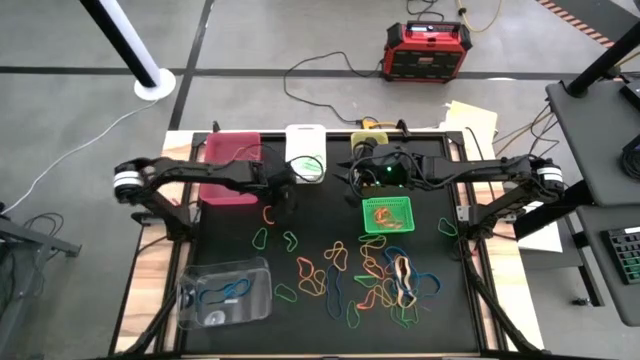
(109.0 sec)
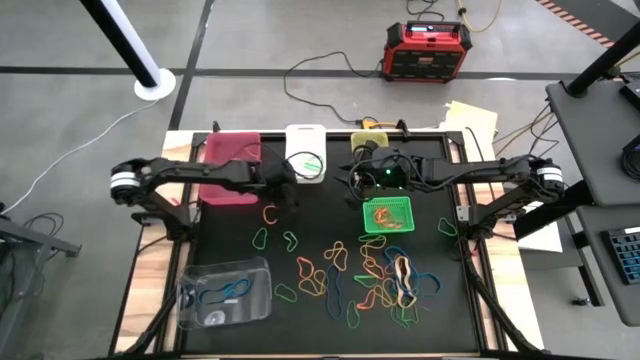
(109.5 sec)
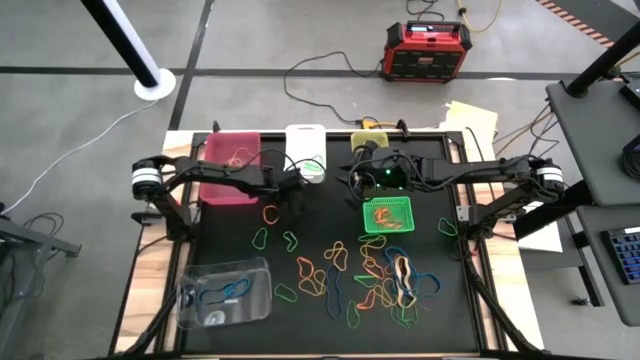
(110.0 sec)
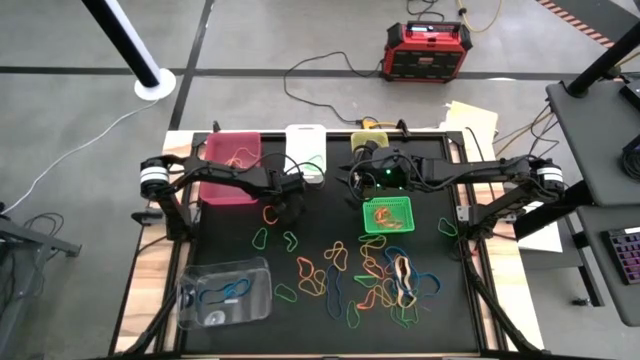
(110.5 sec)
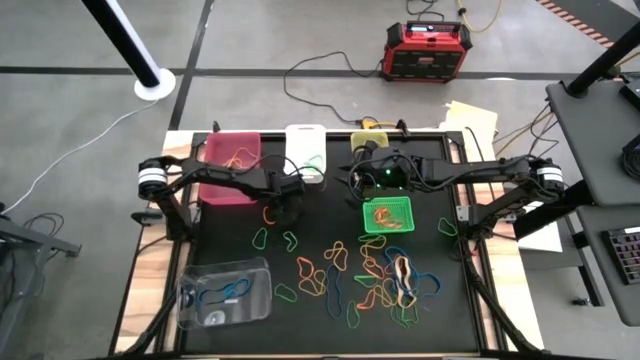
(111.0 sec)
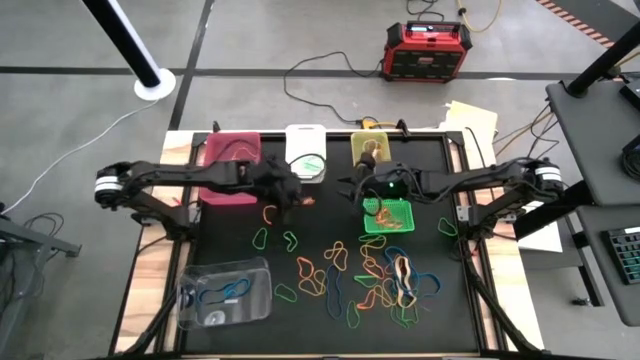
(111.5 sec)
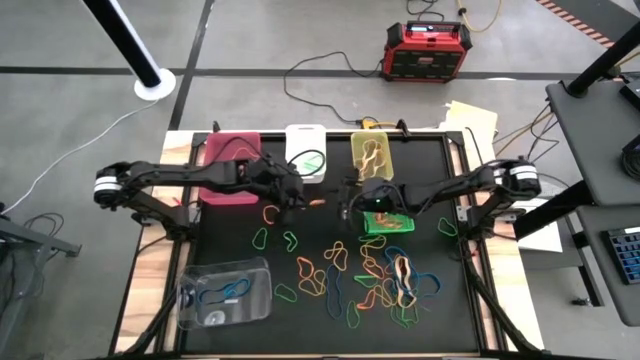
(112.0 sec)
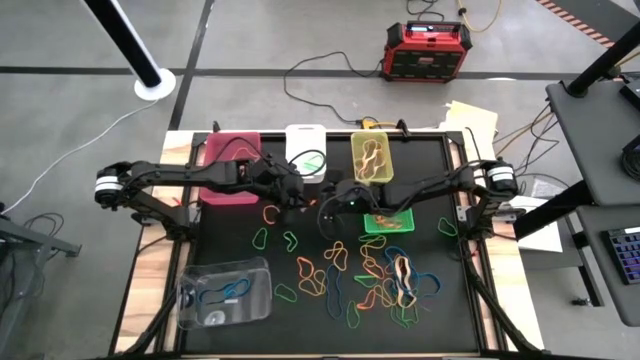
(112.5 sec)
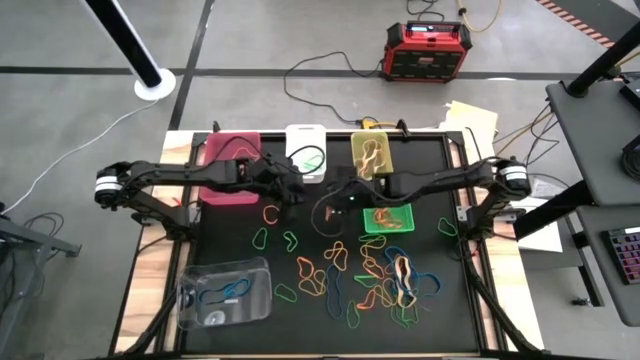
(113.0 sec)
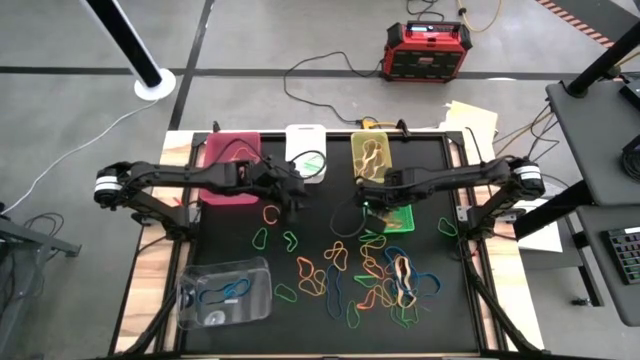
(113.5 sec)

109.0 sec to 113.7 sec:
Task: Sort rubber bands into baskets
Put the orange rubber band into the green bin

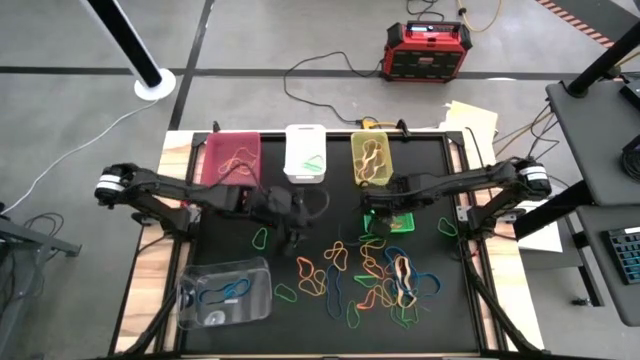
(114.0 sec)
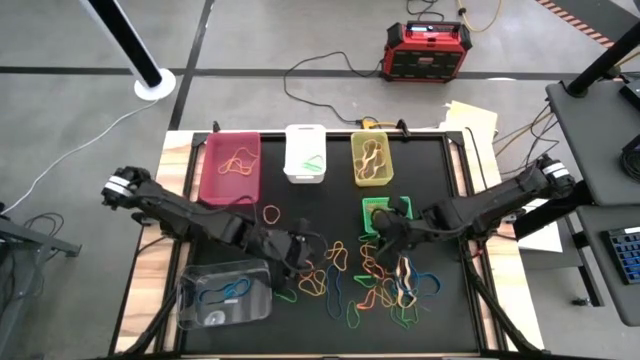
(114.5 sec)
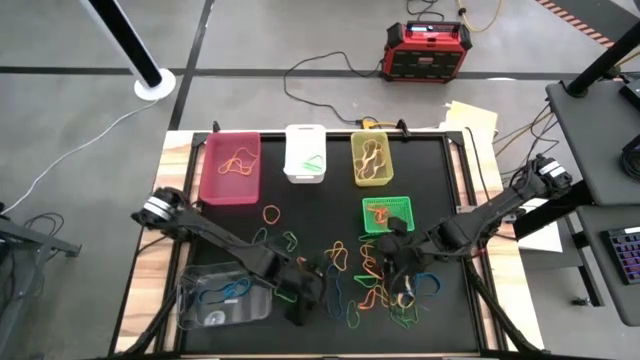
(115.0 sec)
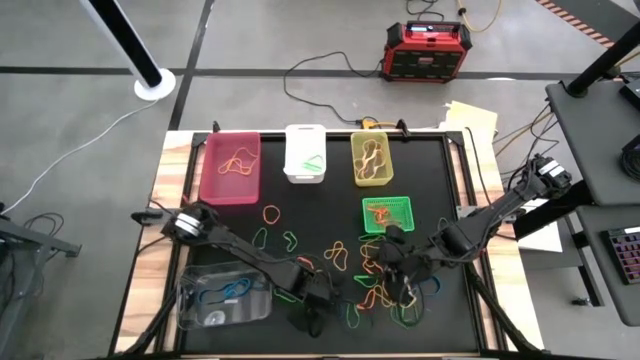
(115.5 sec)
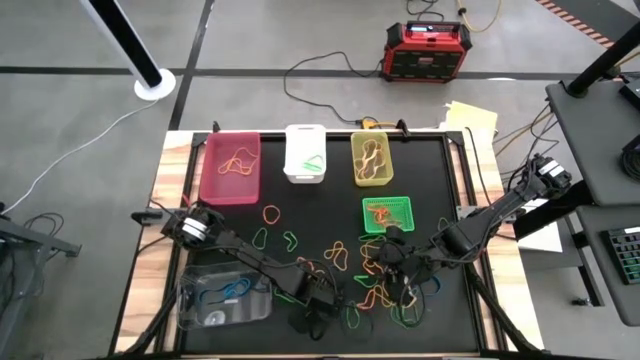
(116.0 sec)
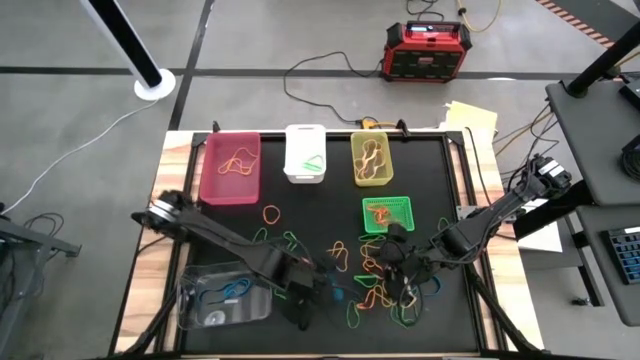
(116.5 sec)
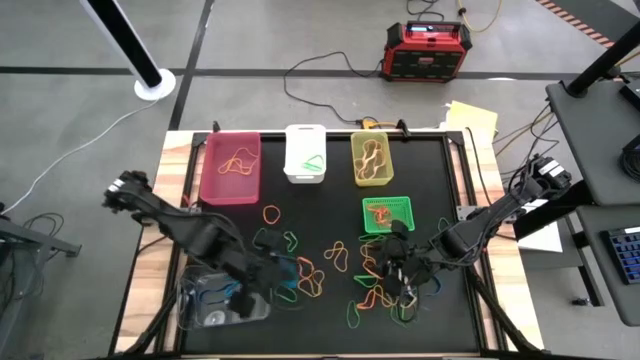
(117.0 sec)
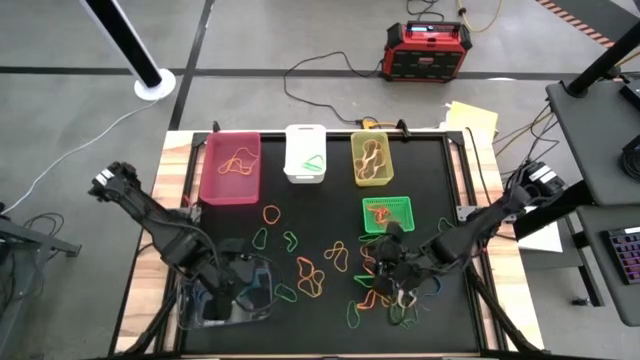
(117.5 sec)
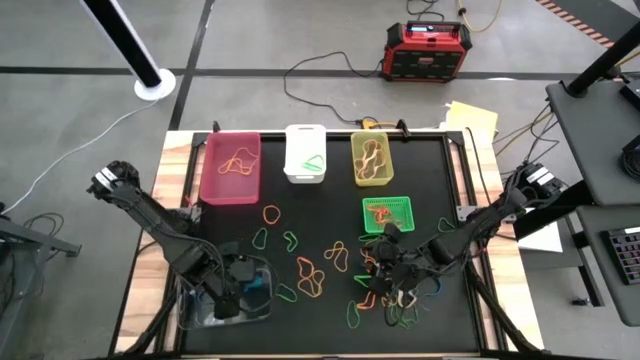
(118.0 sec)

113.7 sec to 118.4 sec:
Put the blue rubber band into the transparent bin

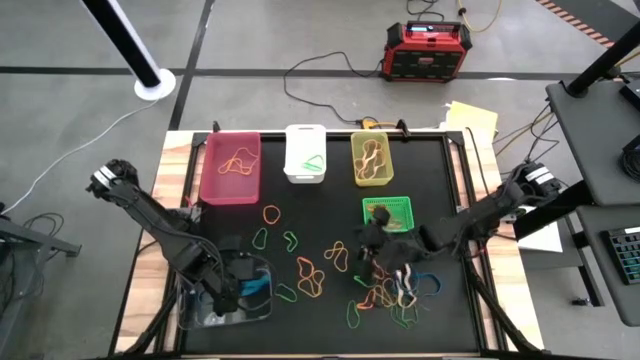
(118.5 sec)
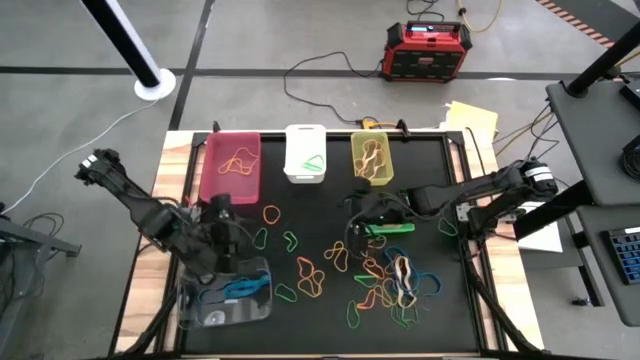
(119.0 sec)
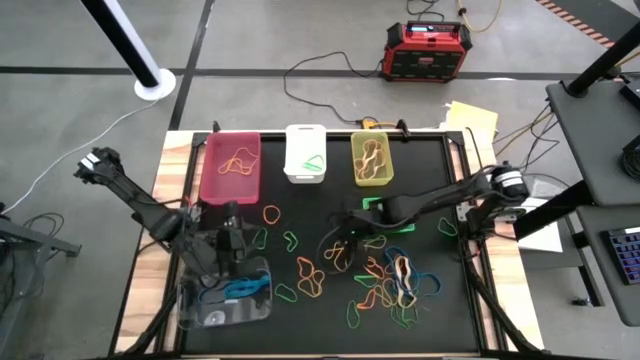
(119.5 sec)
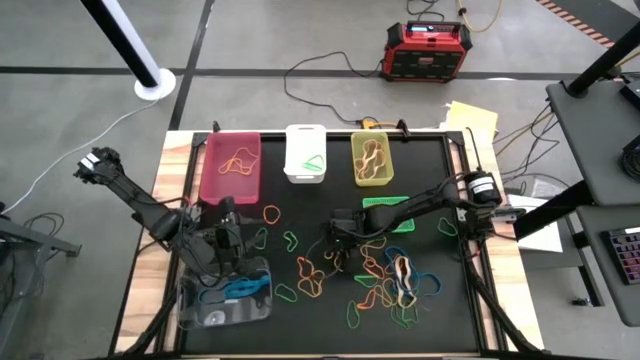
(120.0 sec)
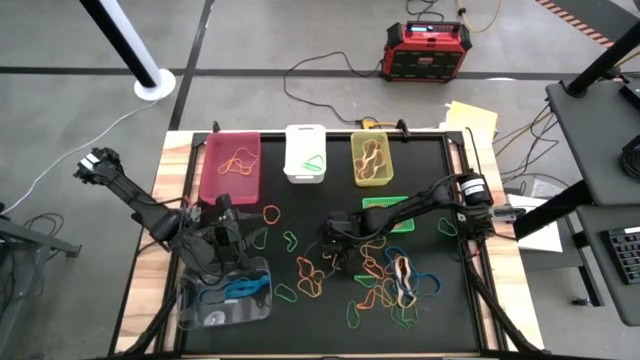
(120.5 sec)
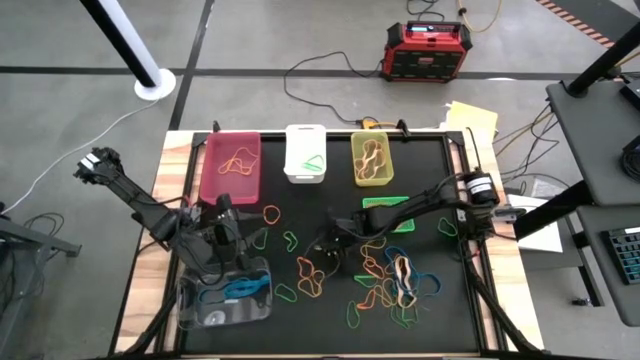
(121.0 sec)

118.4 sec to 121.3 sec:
Put the yellow rubber band into the pink bin

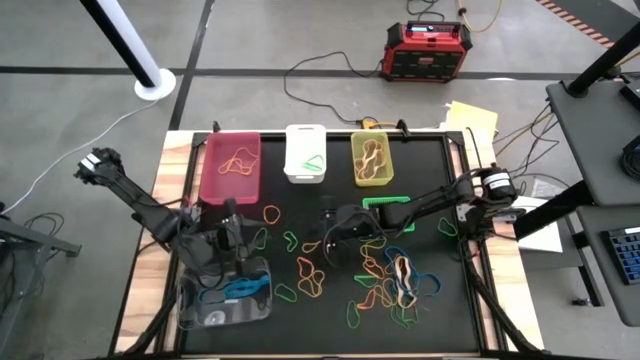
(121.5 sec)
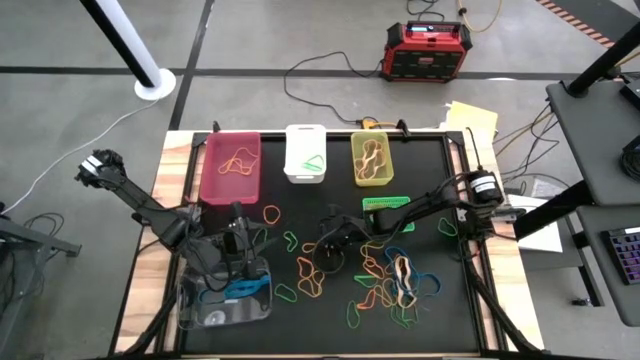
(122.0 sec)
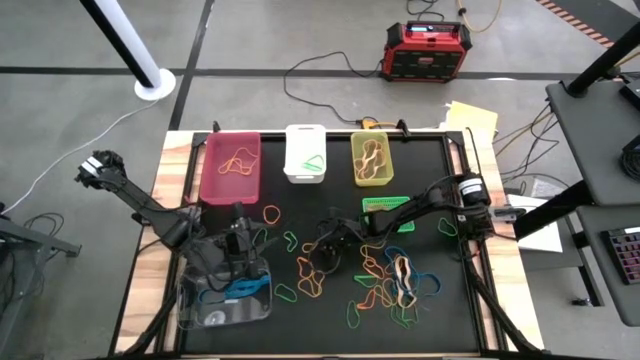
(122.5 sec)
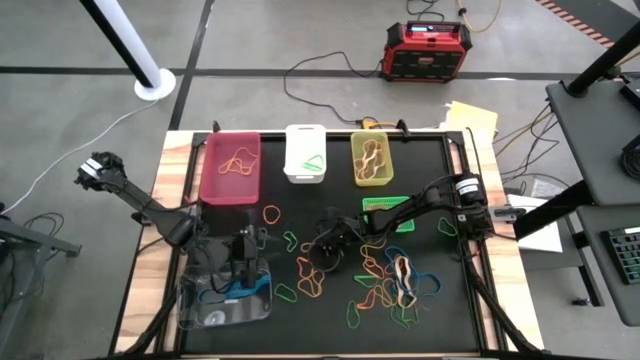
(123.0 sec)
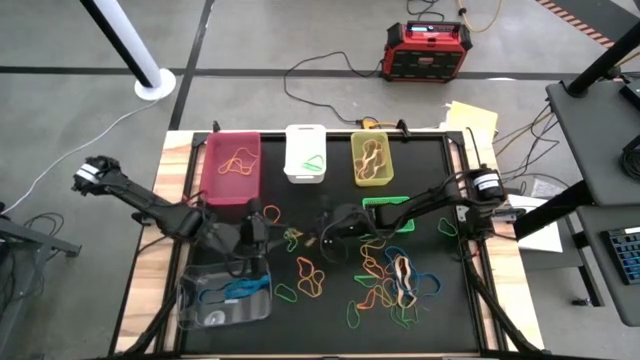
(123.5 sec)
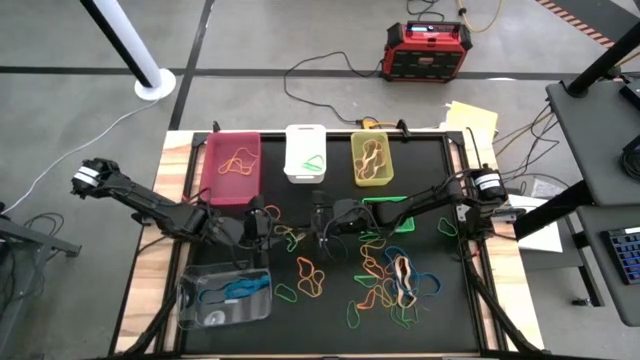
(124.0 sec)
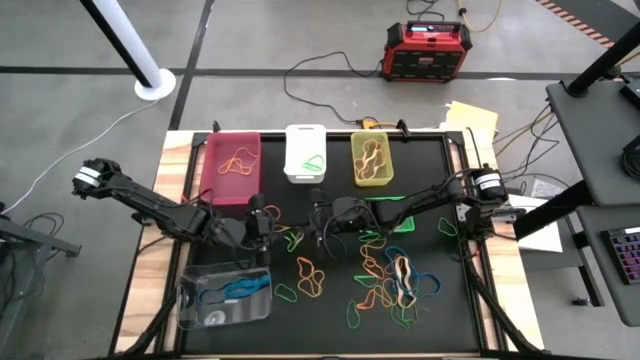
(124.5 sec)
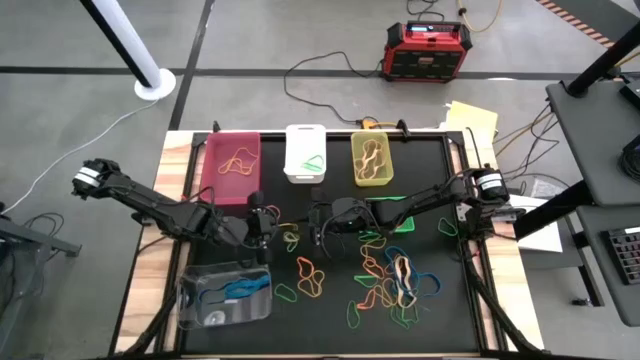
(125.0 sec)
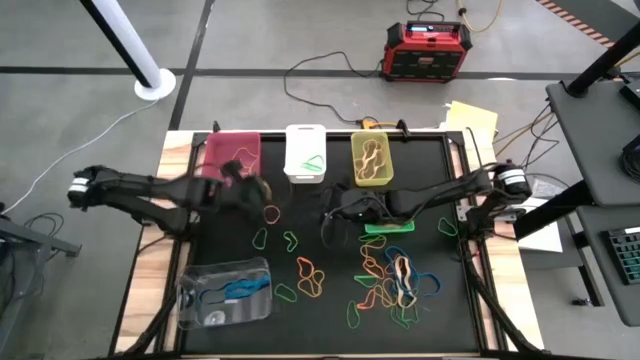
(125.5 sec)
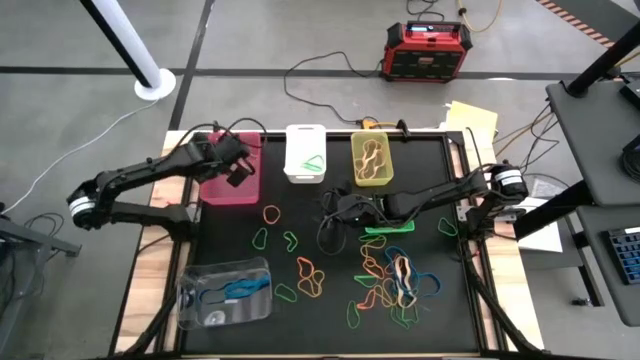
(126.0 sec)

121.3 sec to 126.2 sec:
Put the yellow rubber band into the pink bin

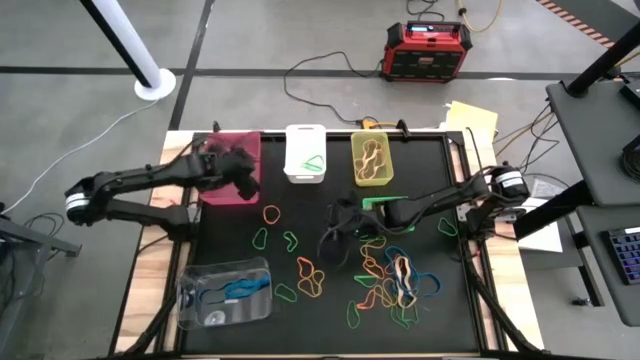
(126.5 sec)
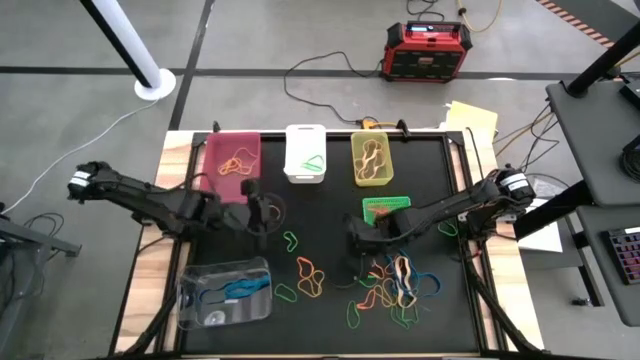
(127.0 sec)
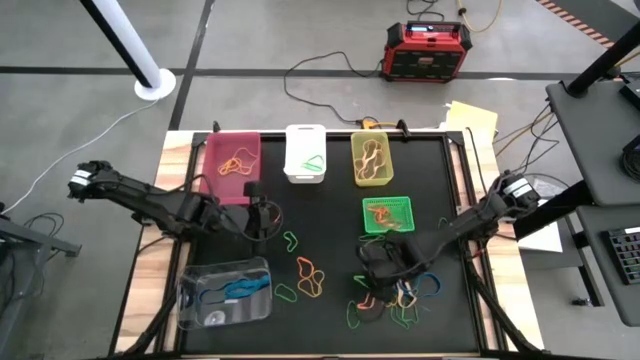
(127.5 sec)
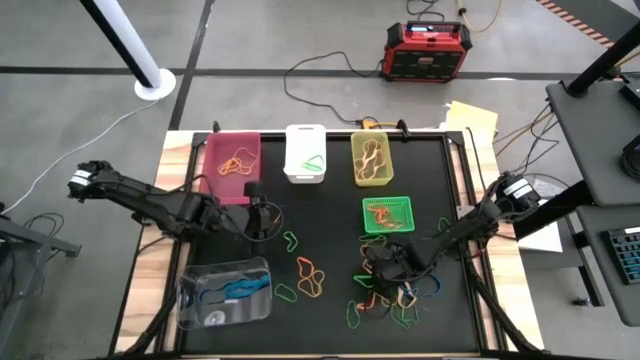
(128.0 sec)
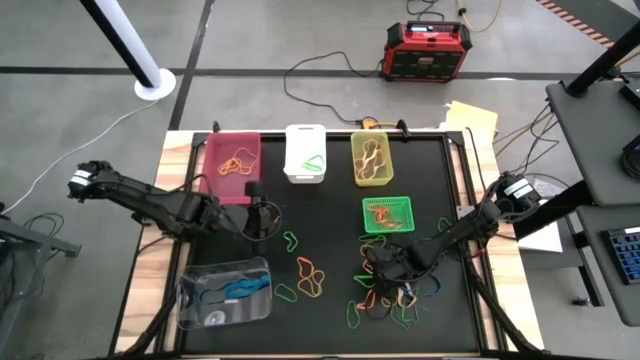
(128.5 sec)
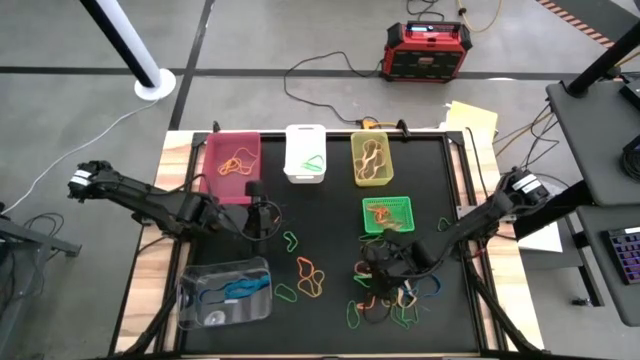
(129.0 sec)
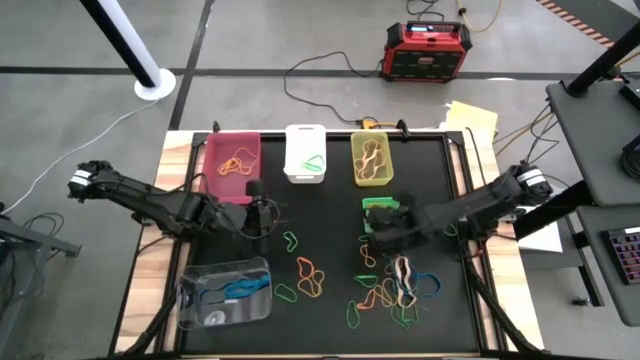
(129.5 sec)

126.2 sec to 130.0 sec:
Put the orange rubber band into the green bin
